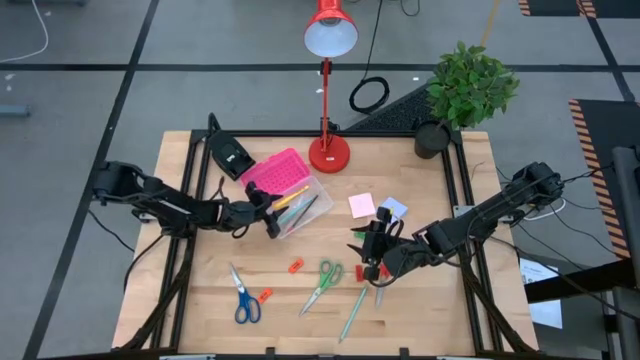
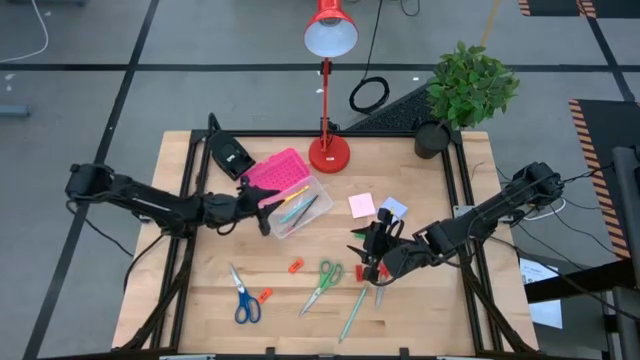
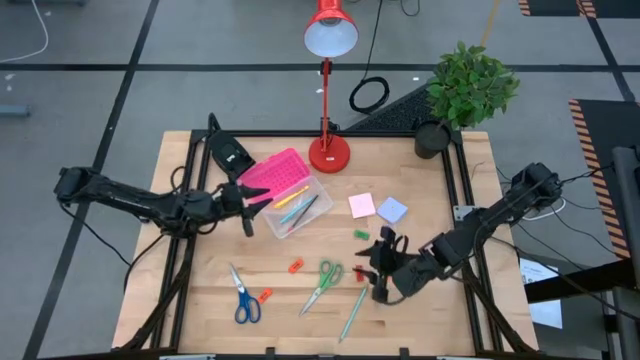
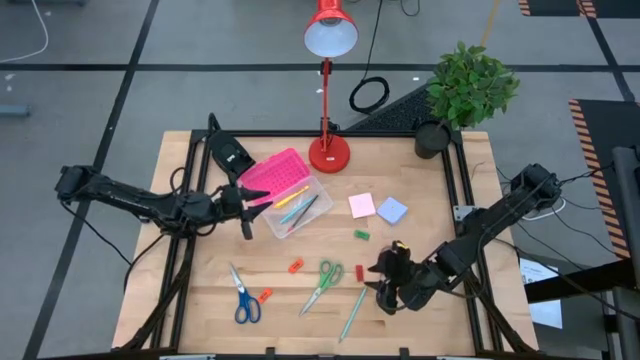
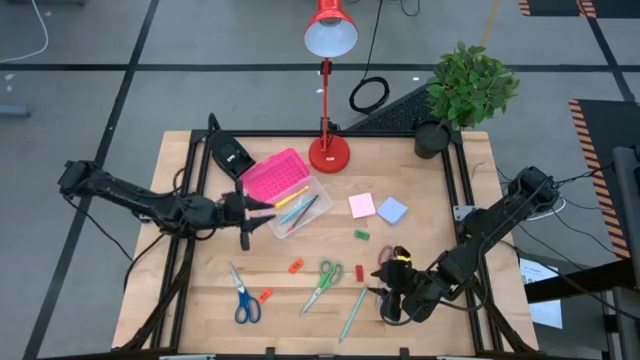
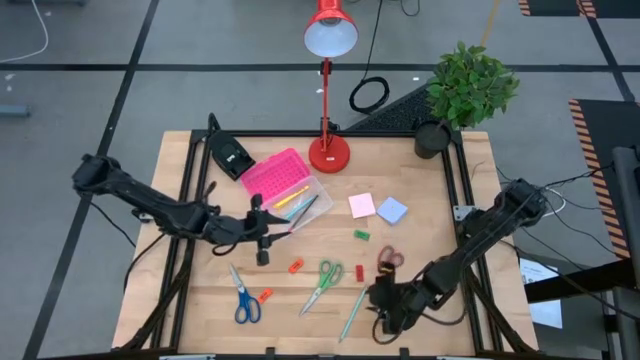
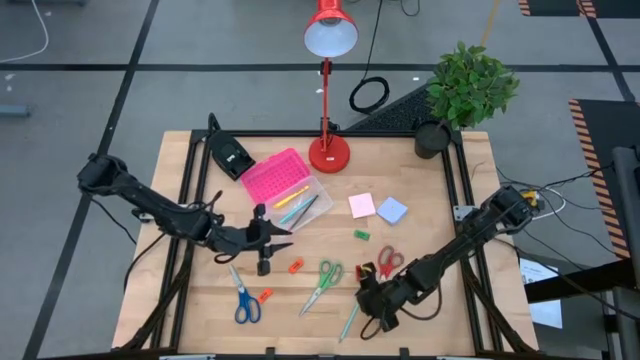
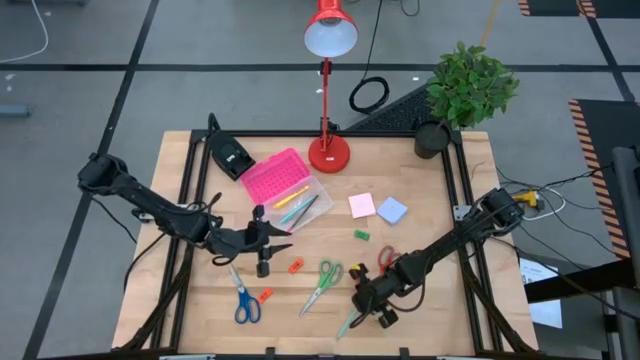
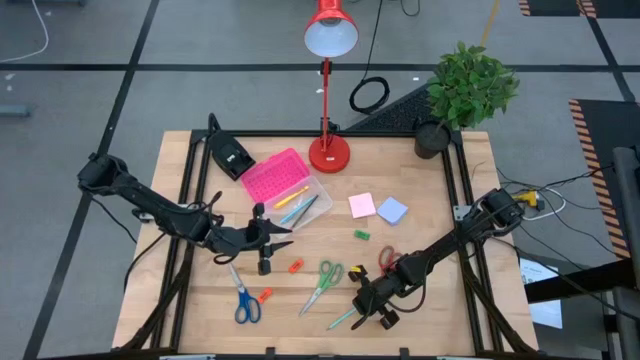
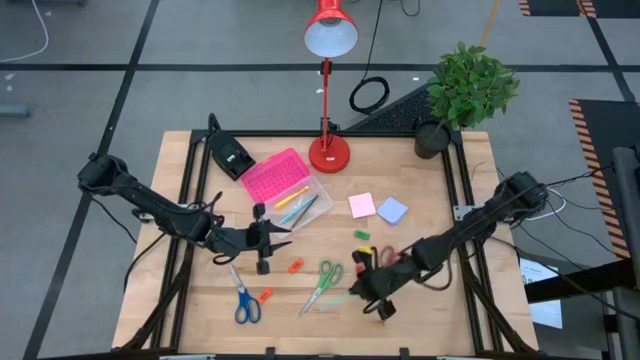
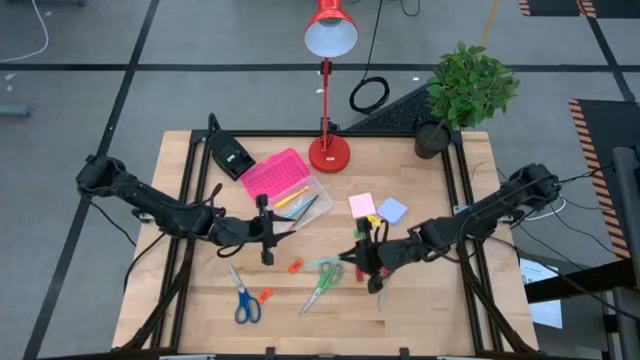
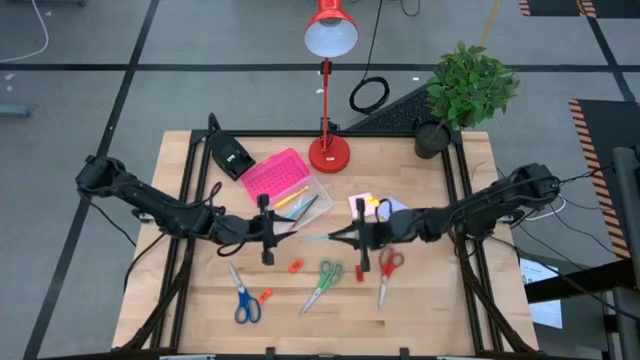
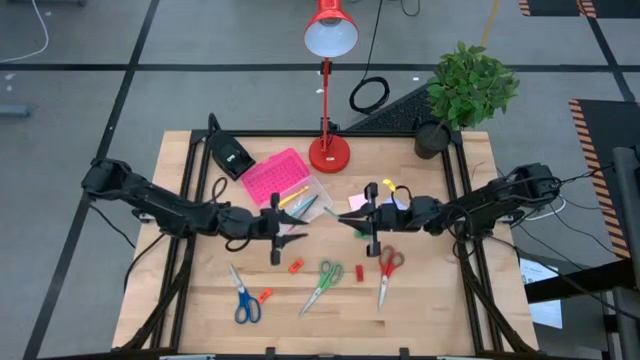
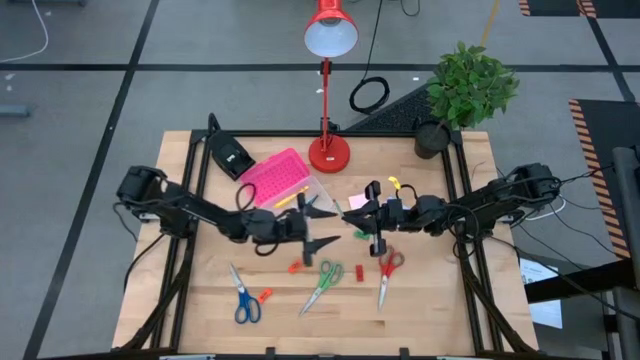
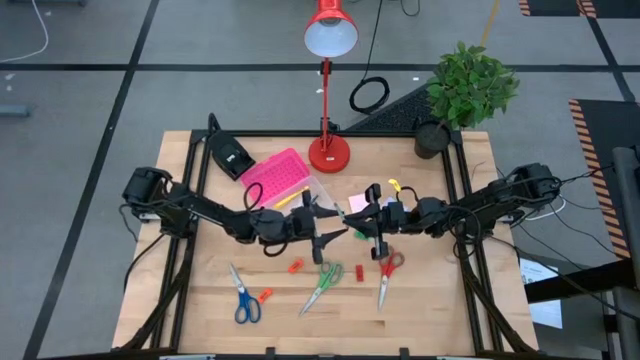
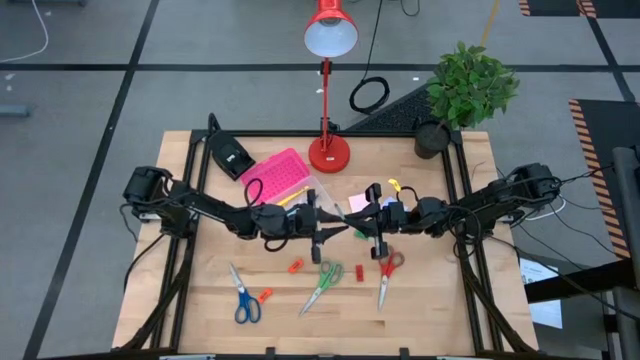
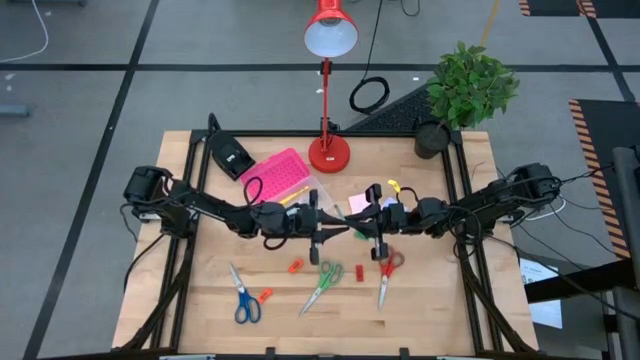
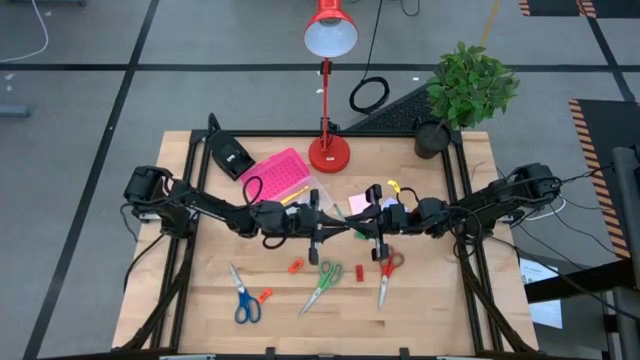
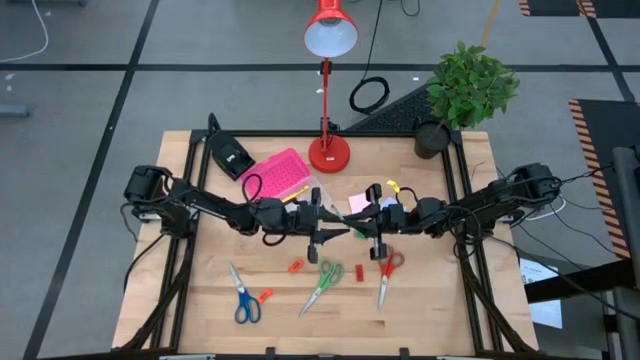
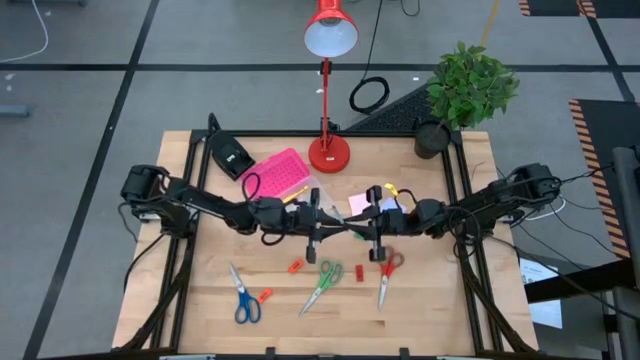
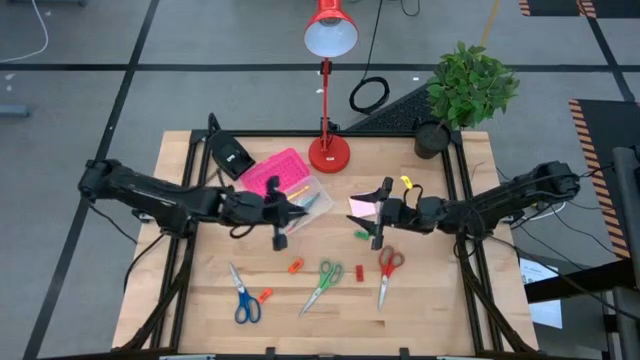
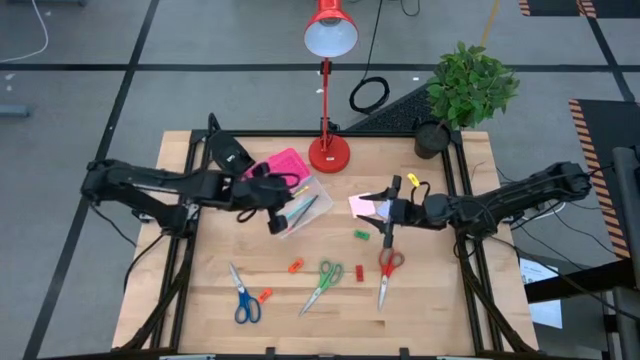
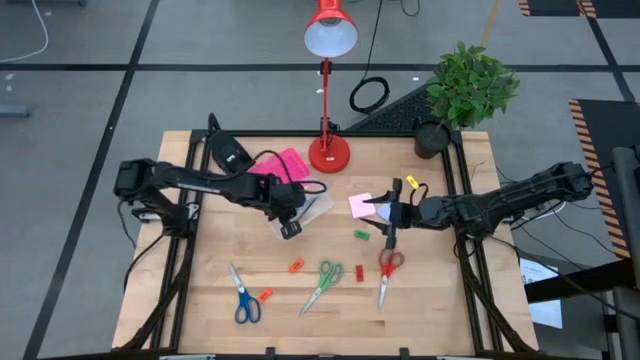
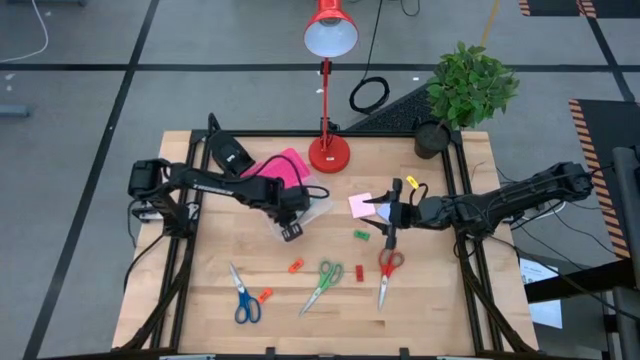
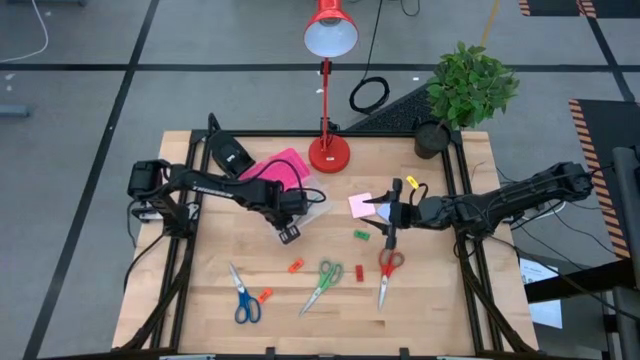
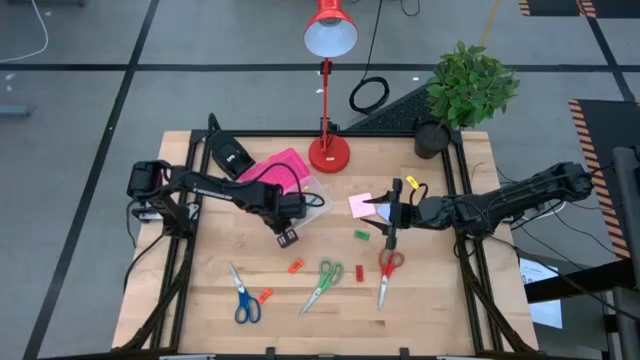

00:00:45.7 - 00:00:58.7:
Task: Pack school essentials
Put the light blue pencil into the pink supply box

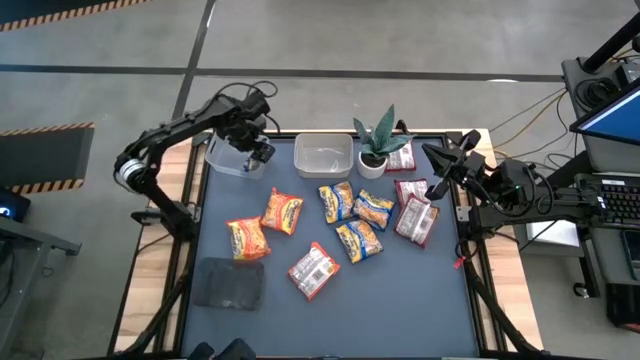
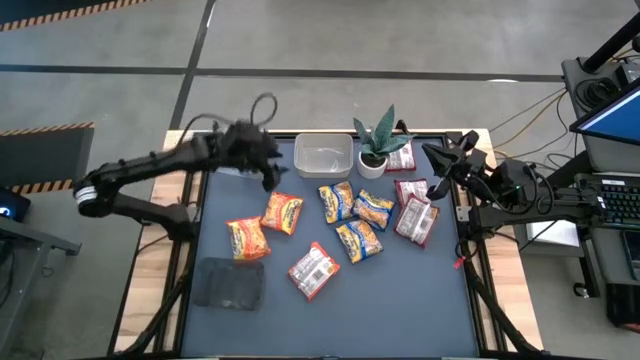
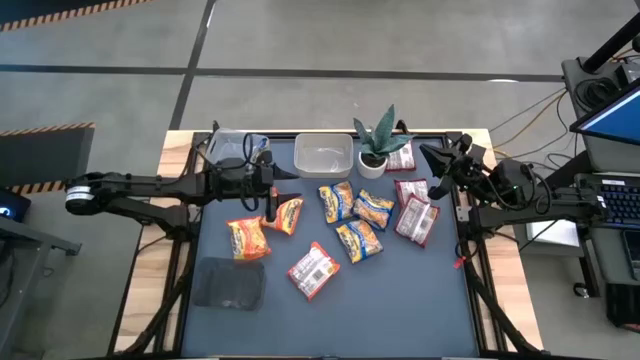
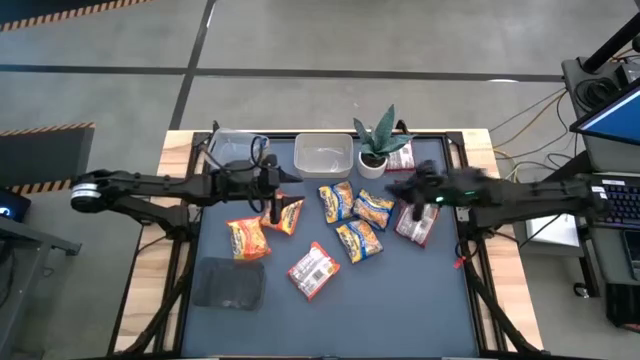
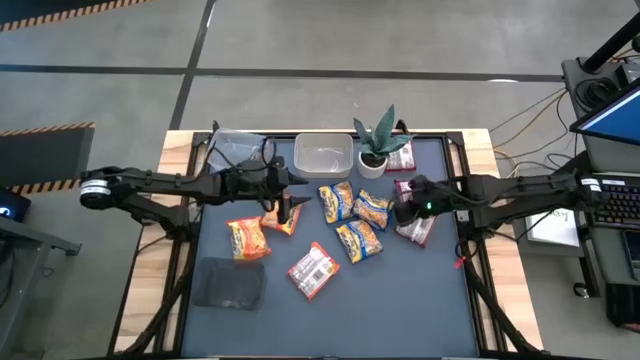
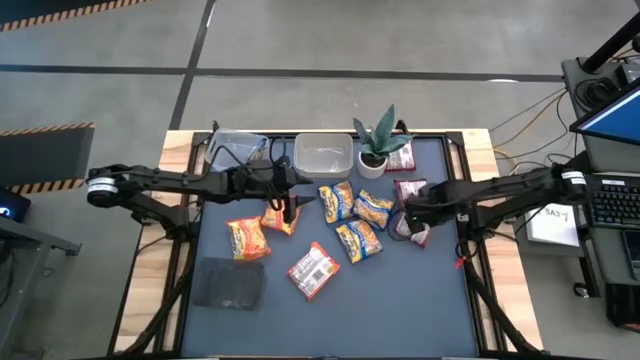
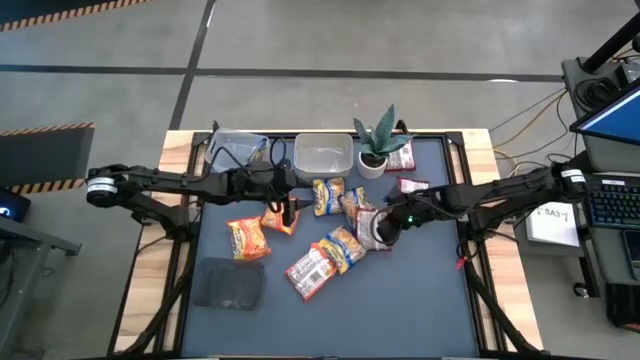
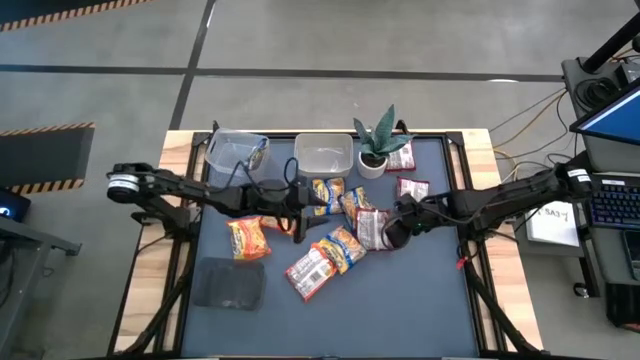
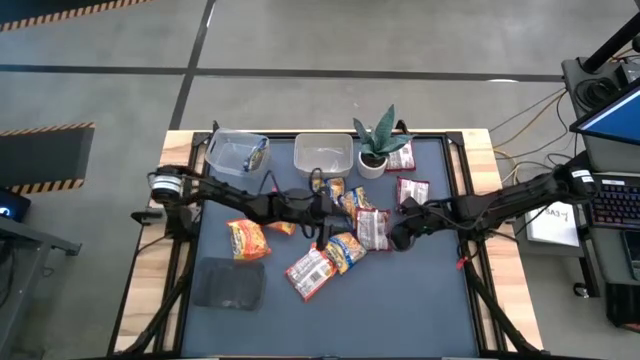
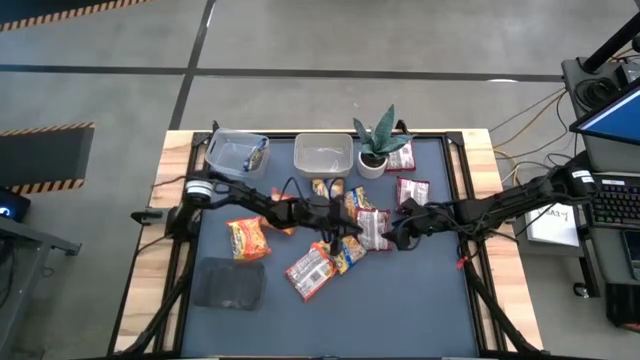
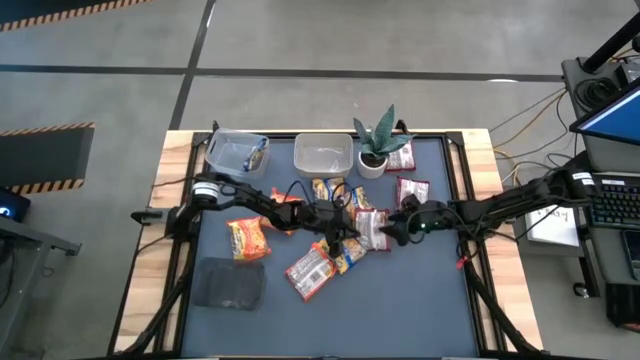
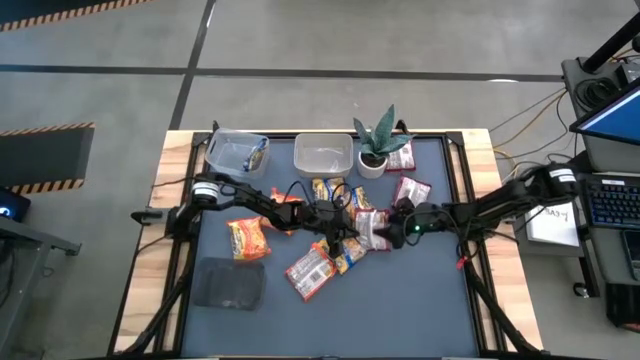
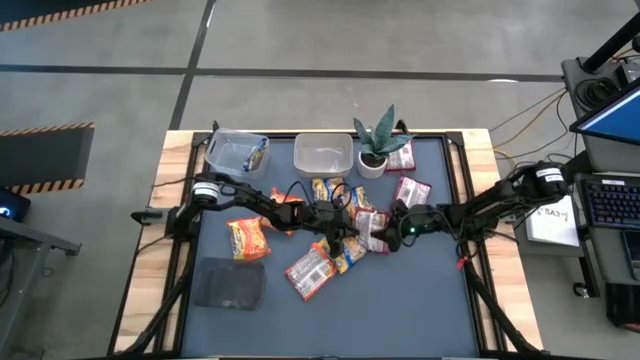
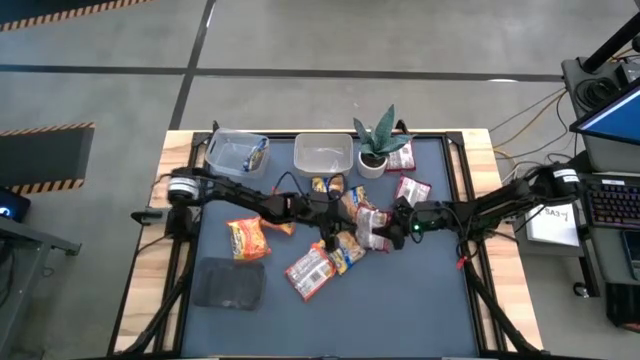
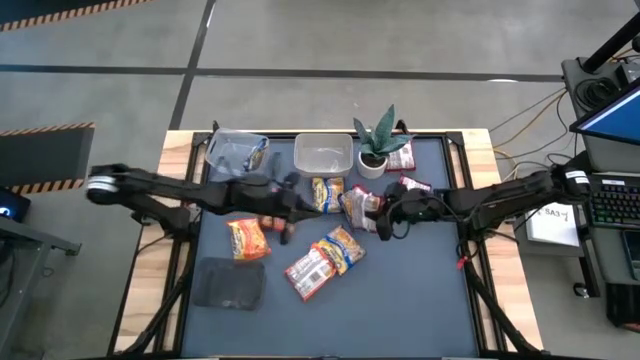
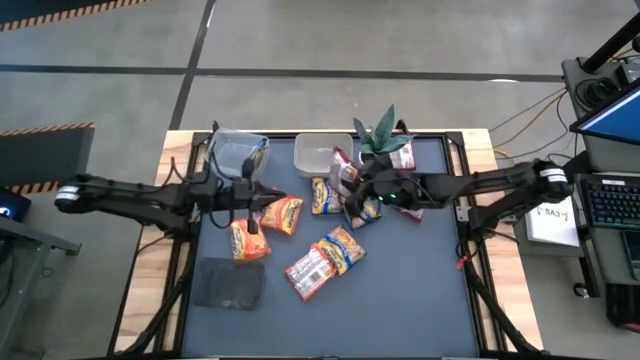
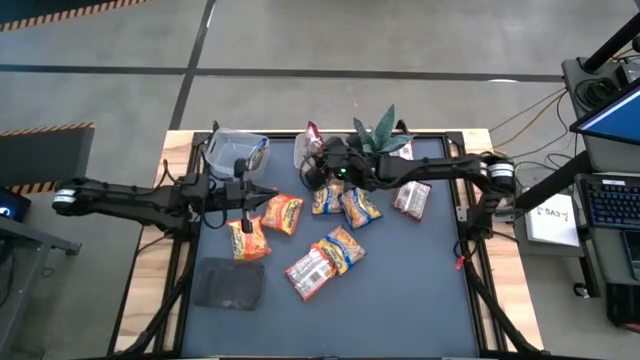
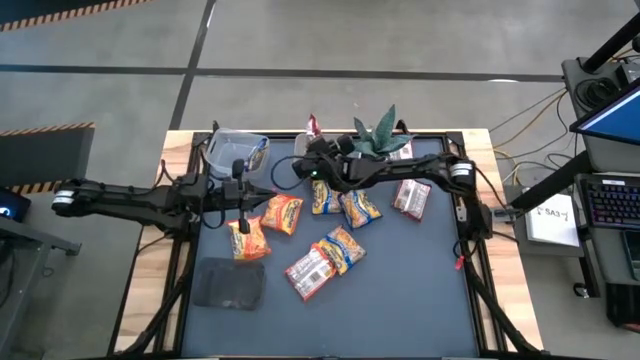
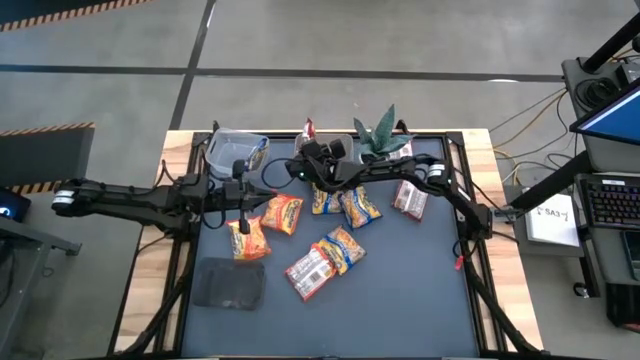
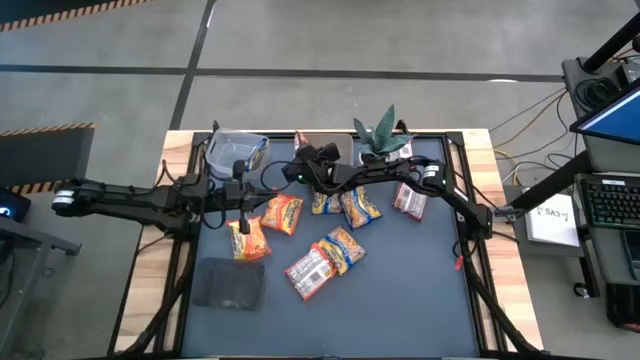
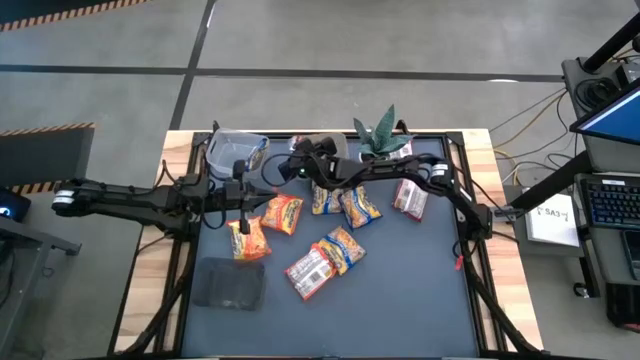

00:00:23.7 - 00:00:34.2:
Task: Sort Maruchan noodles
Put the red noodle pack into the gray bin
